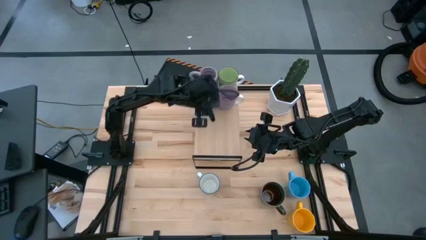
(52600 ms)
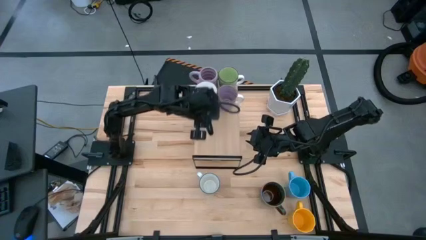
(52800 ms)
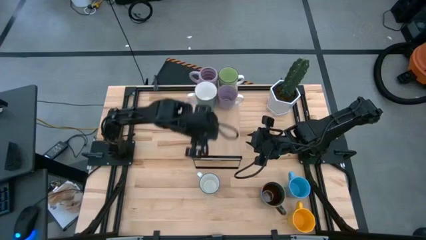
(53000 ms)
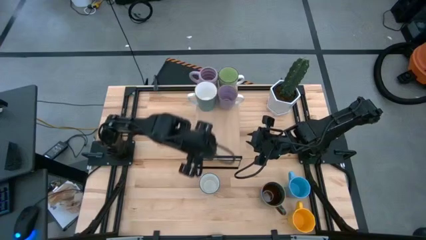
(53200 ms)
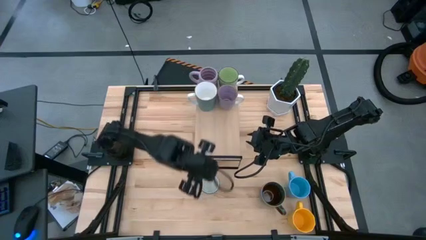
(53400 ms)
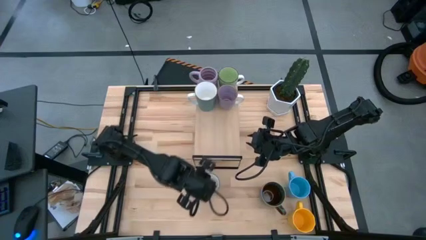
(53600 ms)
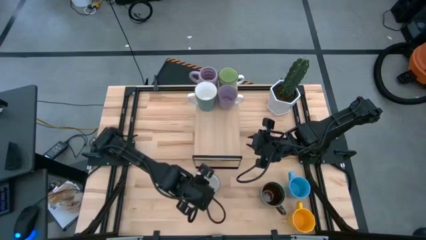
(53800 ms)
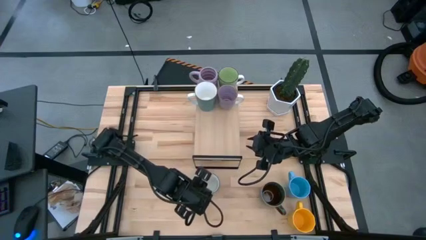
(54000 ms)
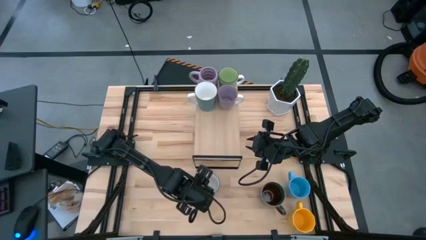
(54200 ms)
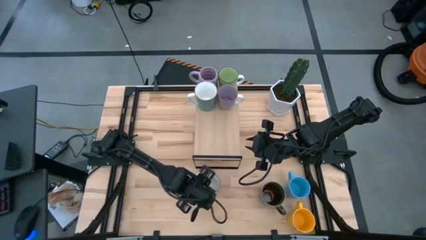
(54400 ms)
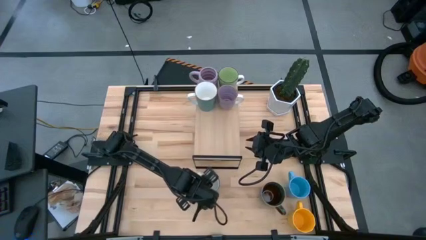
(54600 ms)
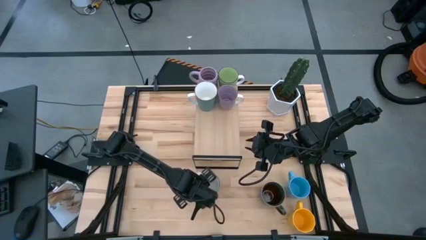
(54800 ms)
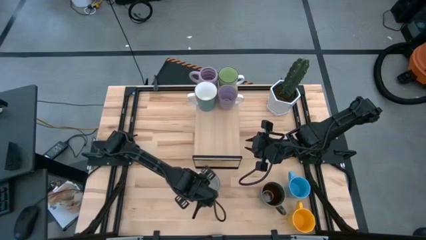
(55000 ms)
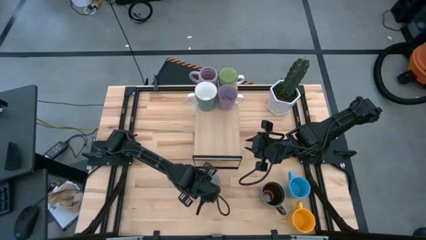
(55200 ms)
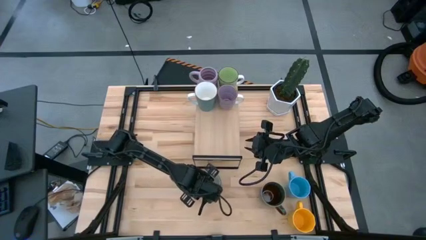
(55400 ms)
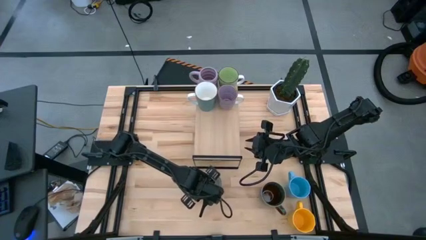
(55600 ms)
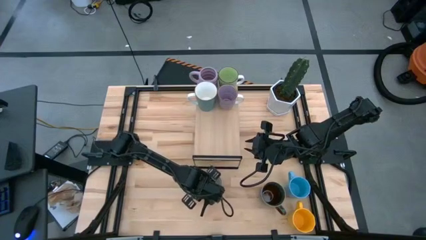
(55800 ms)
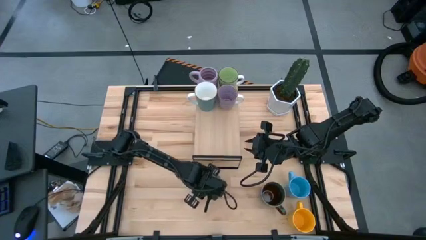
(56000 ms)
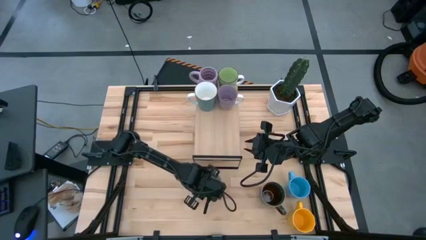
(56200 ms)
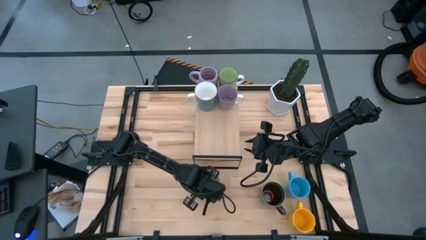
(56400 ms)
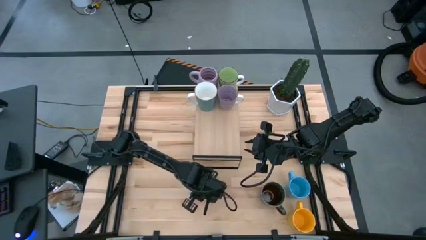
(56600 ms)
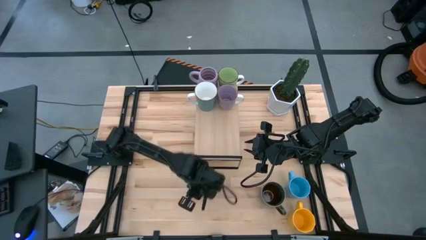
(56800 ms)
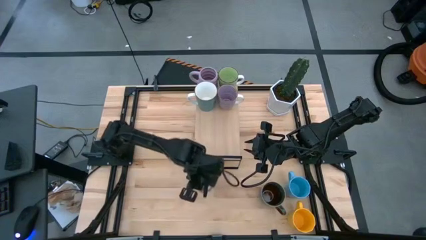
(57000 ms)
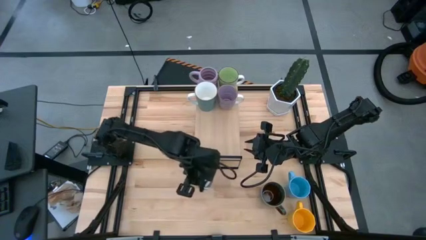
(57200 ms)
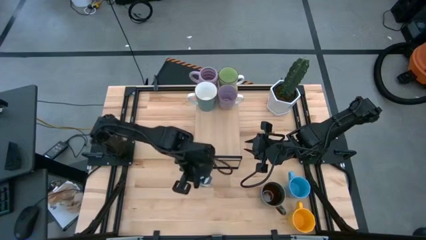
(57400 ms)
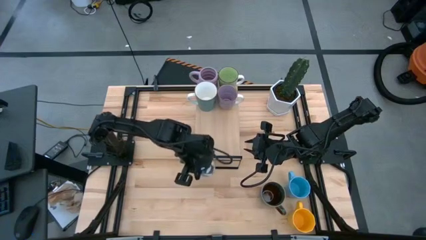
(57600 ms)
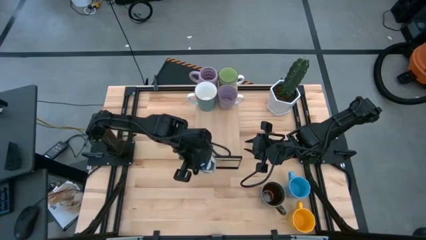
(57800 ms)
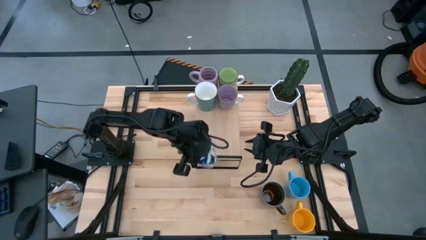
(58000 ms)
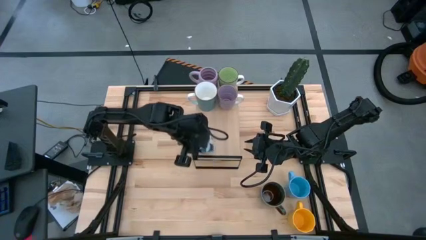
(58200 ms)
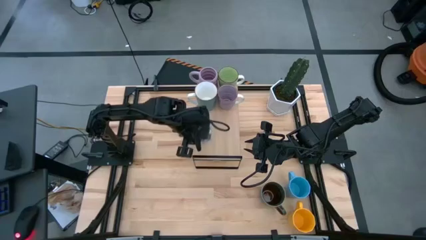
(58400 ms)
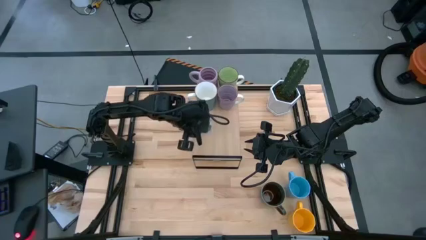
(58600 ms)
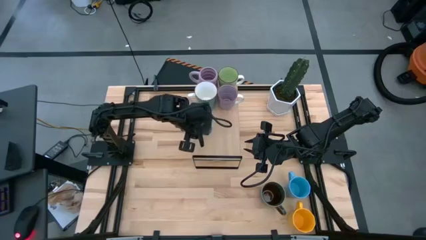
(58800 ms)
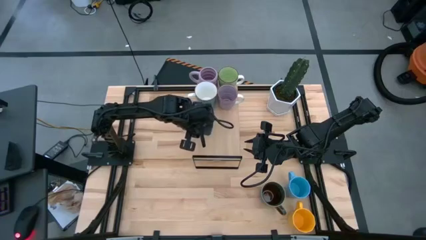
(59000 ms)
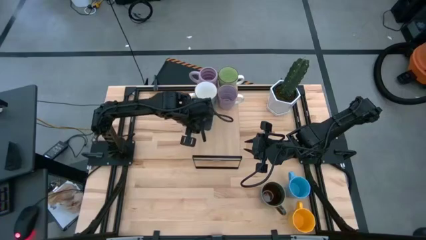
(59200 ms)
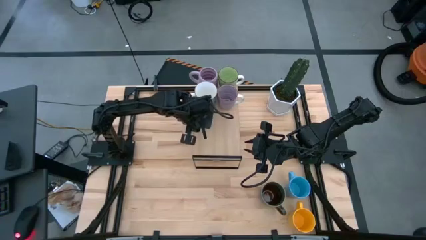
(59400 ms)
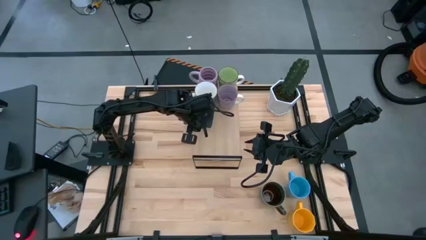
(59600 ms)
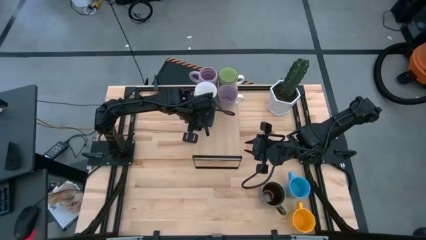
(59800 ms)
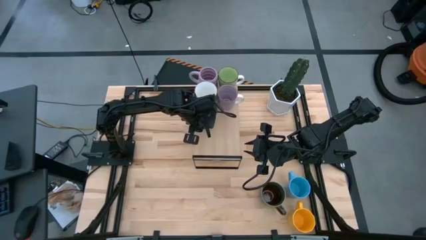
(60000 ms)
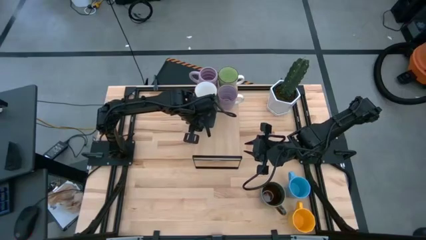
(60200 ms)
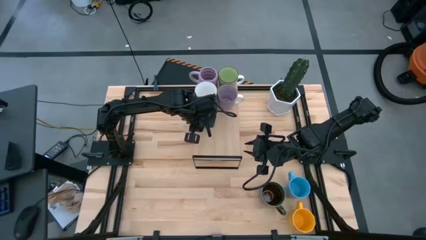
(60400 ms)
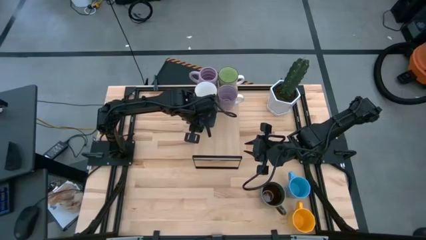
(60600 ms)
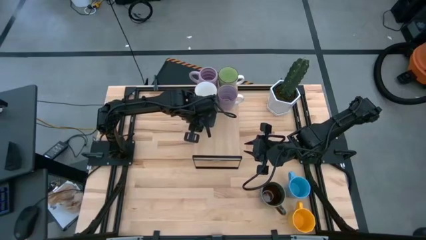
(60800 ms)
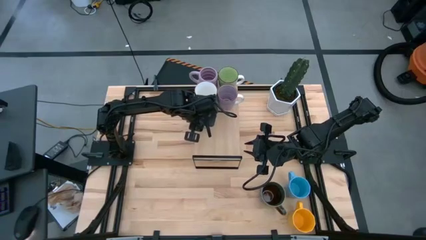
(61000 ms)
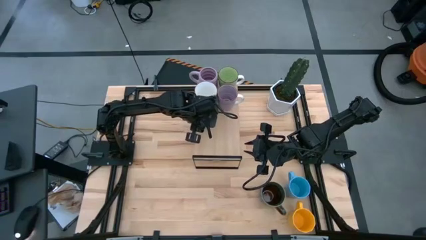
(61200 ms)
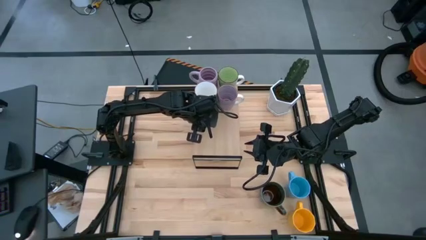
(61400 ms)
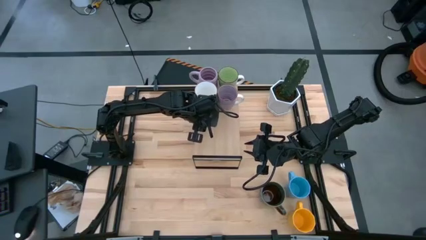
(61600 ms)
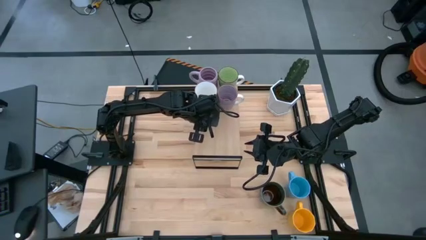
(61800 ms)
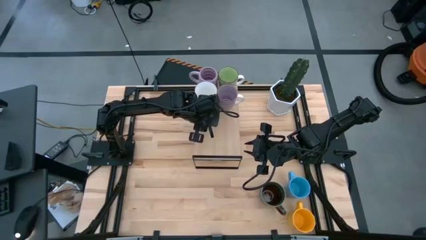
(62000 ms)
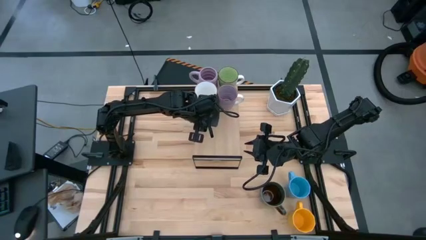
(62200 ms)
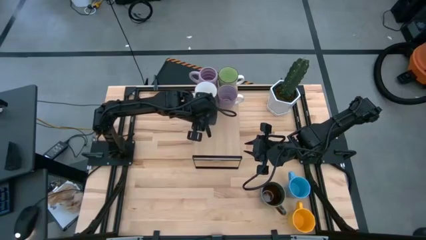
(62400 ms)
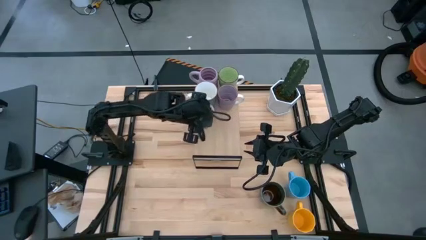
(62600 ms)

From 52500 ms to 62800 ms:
Task: Place coffee mugs
Put the white-blue patterned mug on the shelf

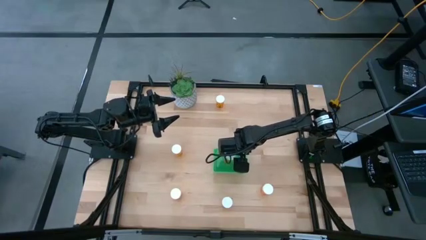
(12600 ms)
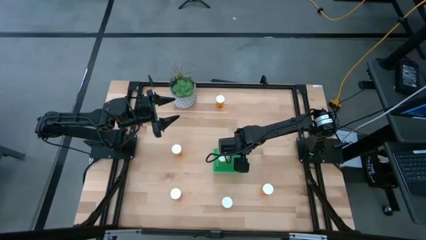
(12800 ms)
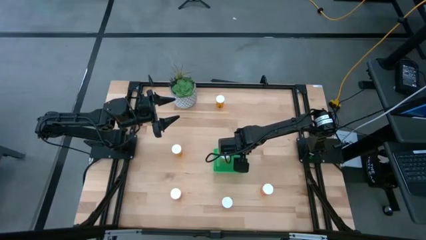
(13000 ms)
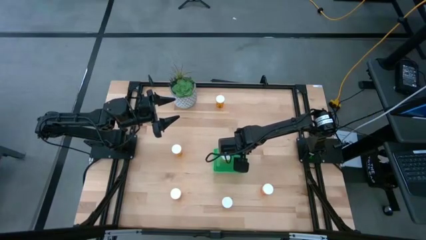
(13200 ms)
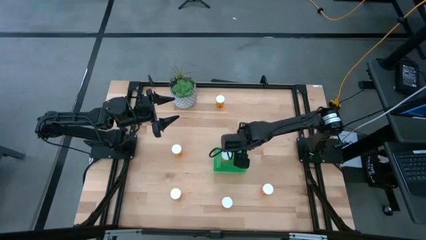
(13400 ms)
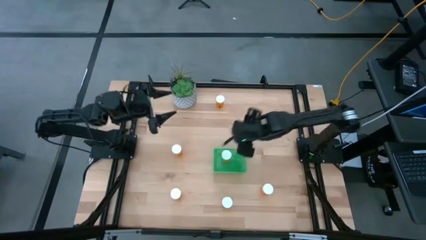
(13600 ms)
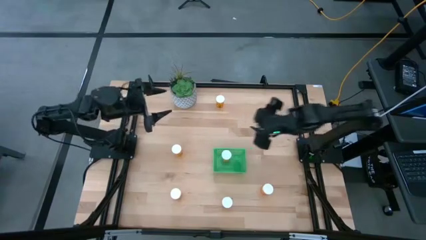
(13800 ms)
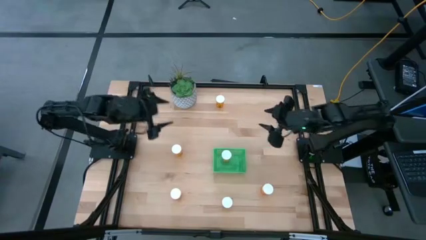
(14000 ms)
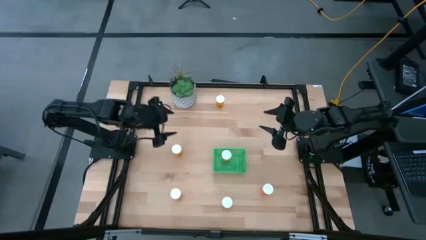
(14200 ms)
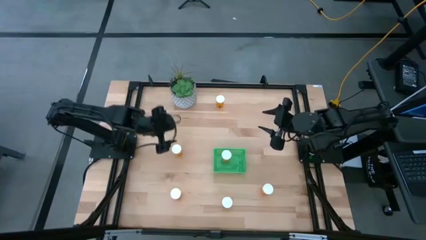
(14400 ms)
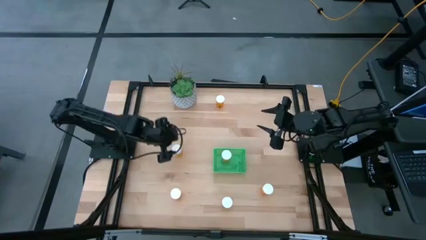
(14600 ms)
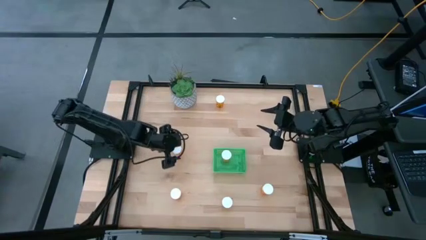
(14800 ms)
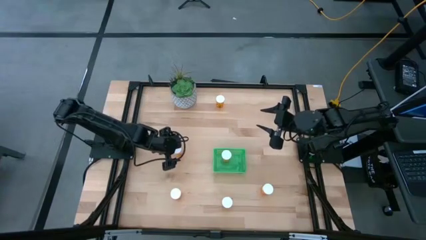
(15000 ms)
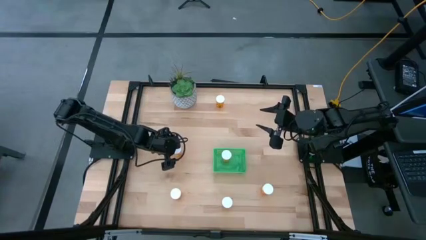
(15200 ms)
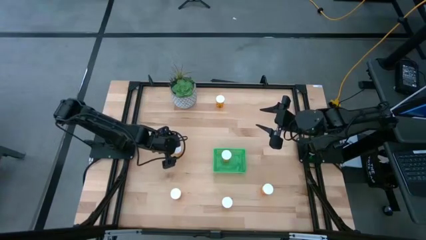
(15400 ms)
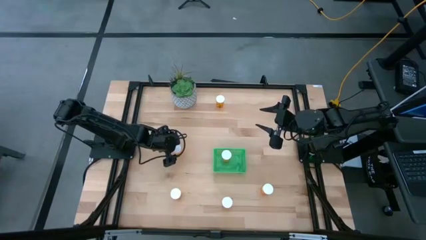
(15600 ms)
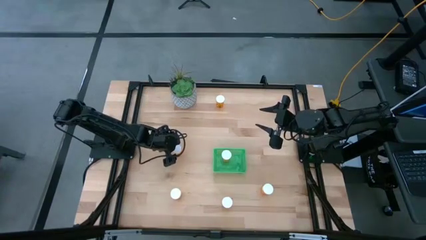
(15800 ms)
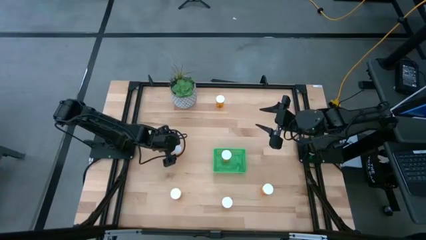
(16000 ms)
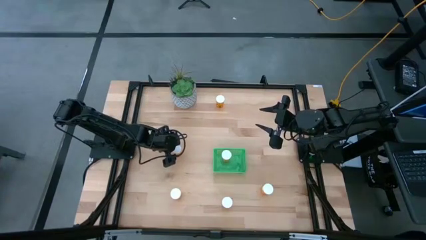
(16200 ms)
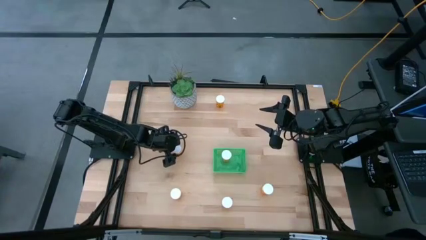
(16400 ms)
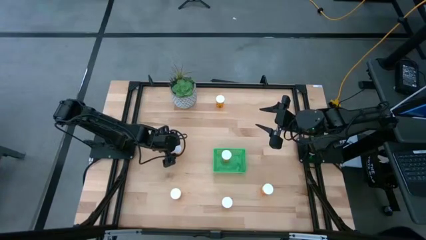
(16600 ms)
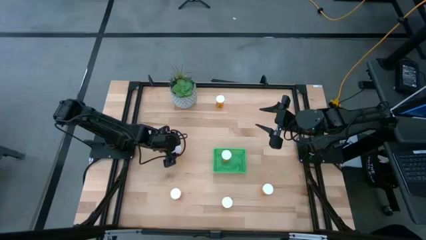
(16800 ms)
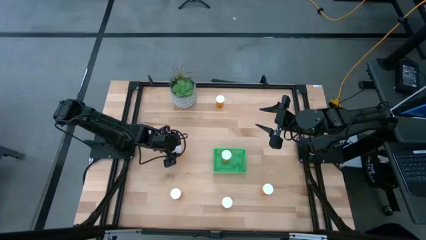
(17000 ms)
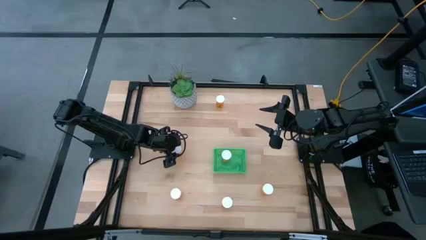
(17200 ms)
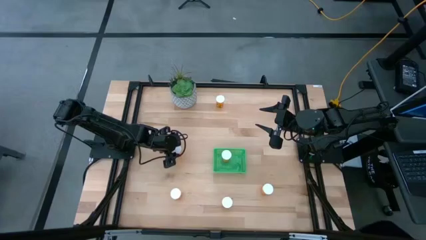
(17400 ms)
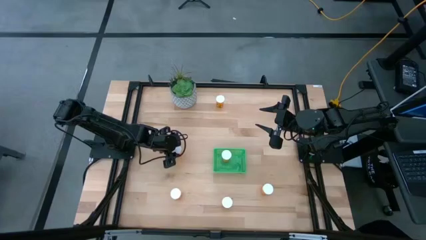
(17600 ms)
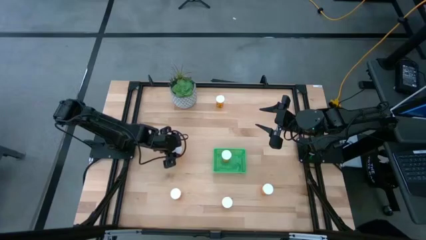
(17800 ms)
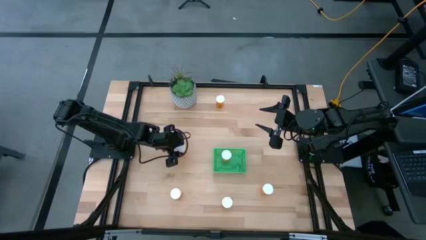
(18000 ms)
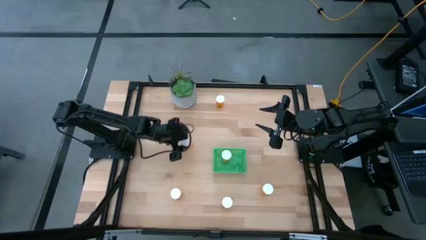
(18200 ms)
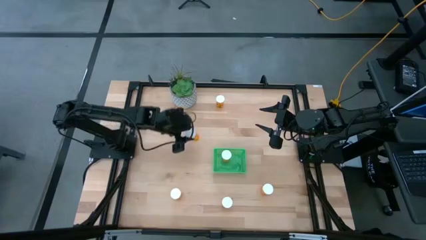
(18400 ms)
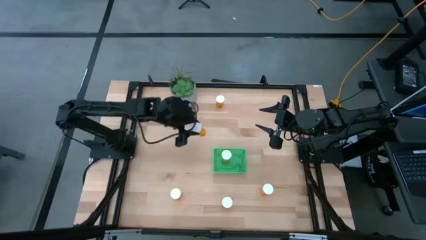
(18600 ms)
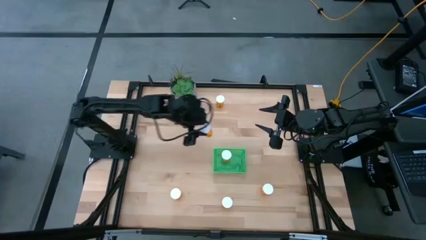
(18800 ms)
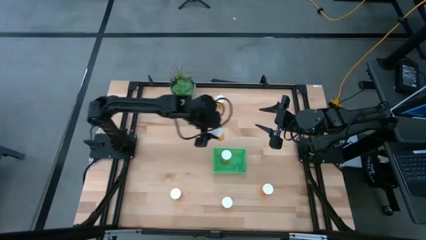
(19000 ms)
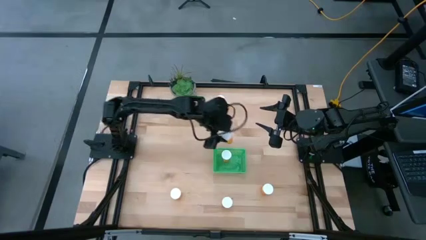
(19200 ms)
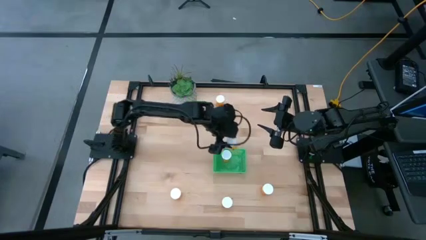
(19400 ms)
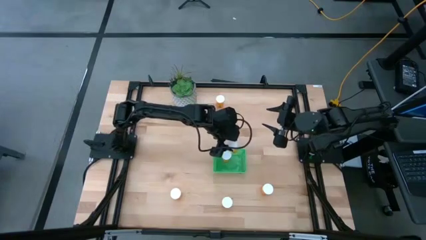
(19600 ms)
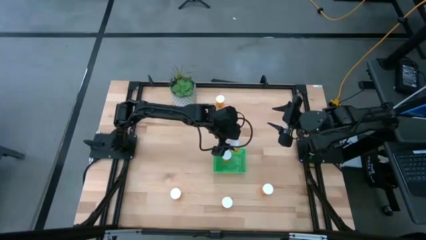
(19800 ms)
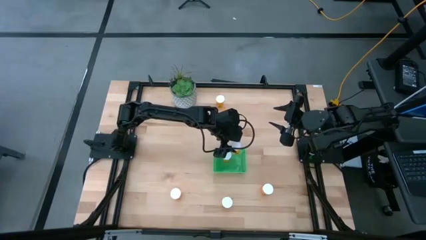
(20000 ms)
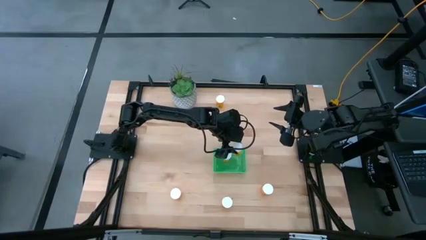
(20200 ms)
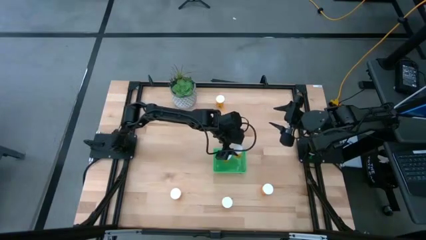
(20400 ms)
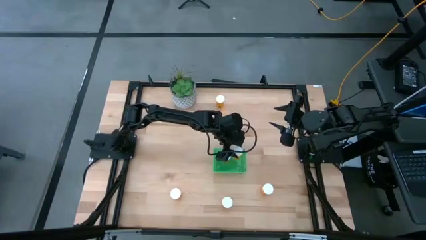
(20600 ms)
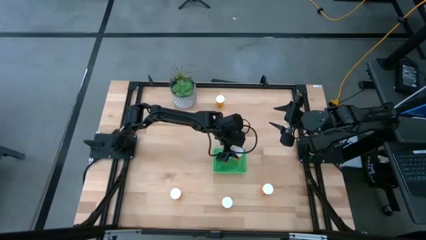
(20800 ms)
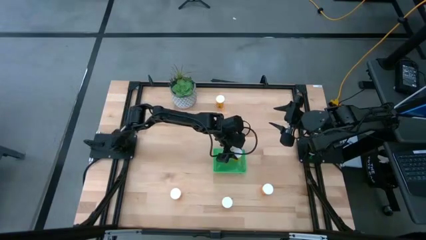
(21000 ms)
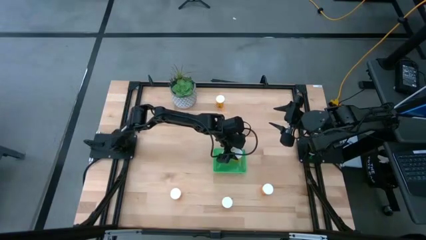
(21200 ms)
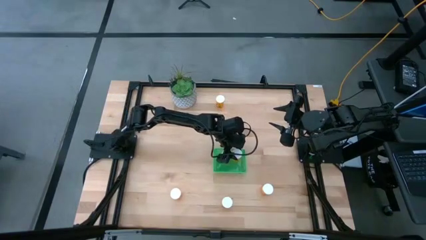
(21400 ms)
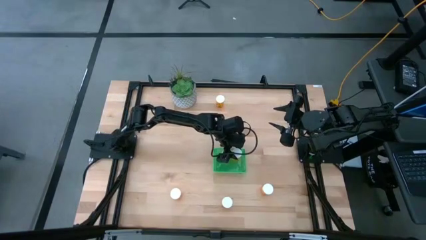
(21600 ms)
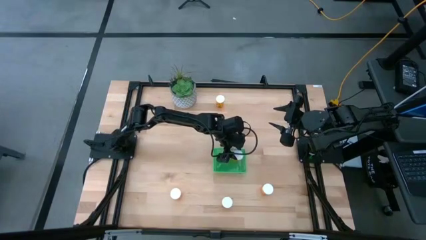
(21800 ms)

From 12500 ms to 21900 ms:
Task: Pick and place pill bottles into a basket
Put the orange pill bottle into the green bin
